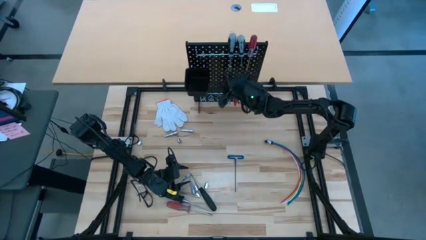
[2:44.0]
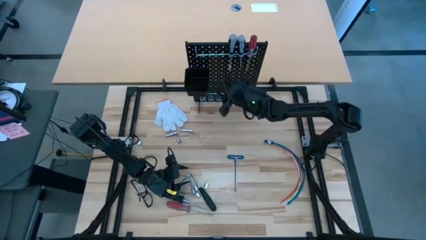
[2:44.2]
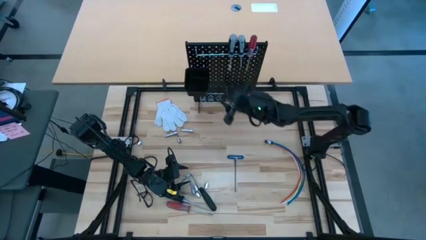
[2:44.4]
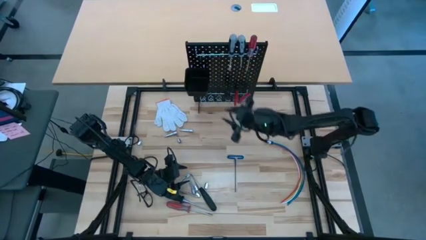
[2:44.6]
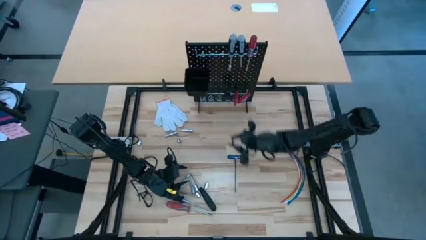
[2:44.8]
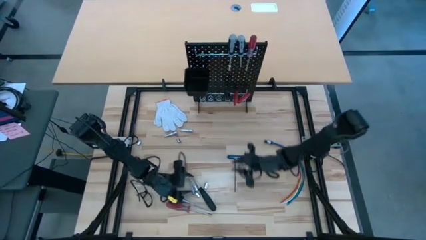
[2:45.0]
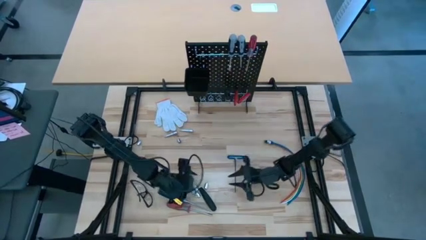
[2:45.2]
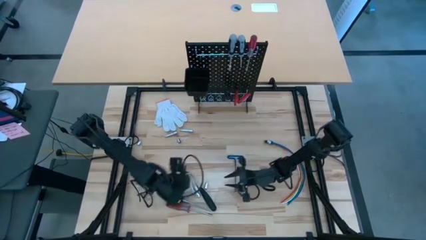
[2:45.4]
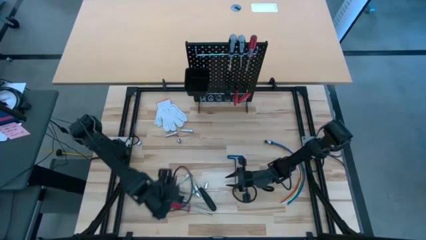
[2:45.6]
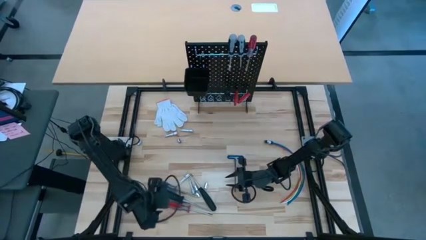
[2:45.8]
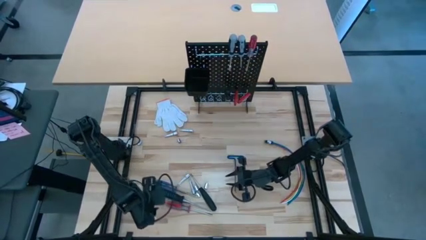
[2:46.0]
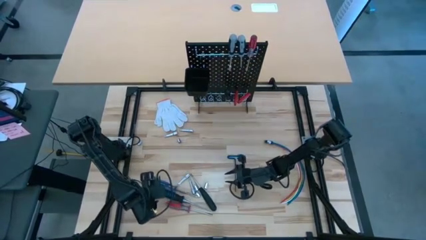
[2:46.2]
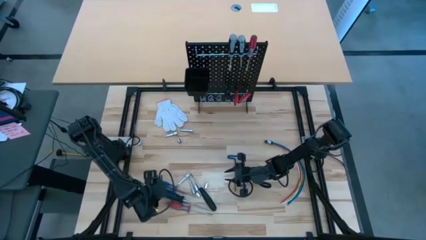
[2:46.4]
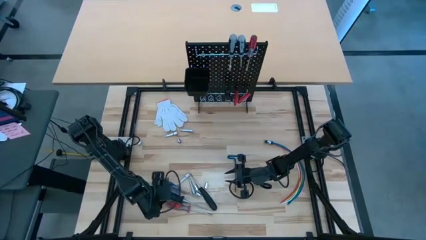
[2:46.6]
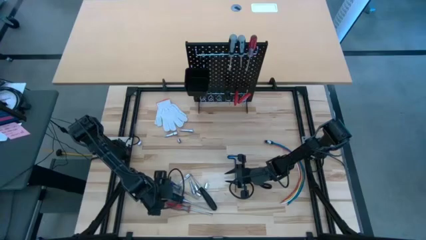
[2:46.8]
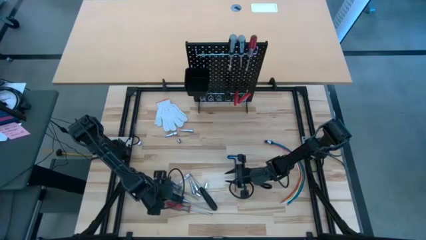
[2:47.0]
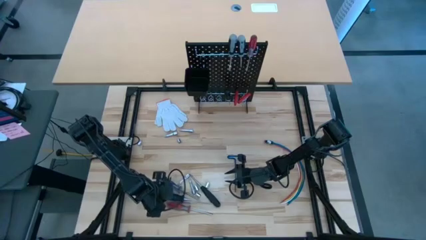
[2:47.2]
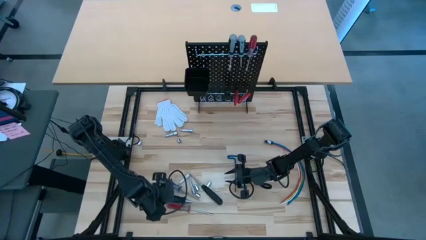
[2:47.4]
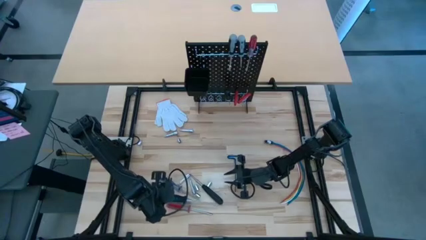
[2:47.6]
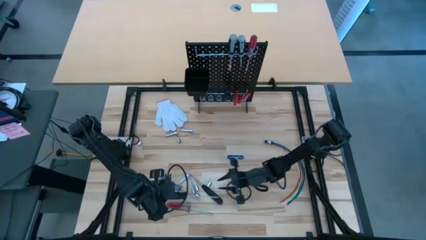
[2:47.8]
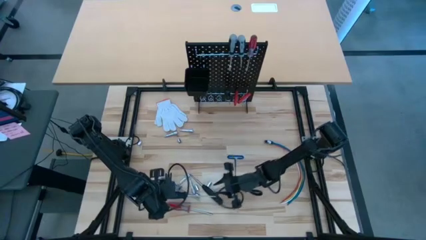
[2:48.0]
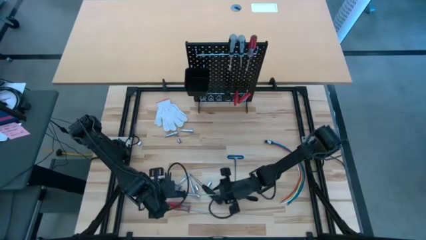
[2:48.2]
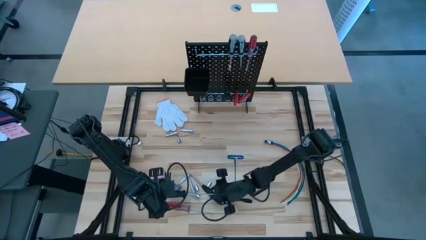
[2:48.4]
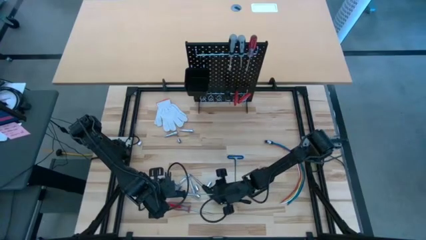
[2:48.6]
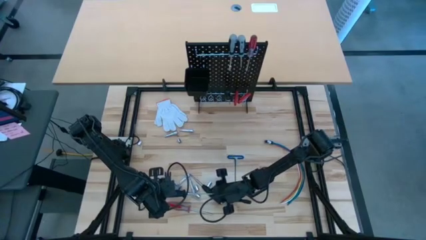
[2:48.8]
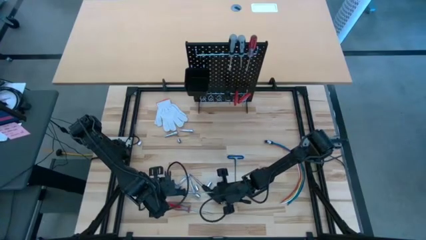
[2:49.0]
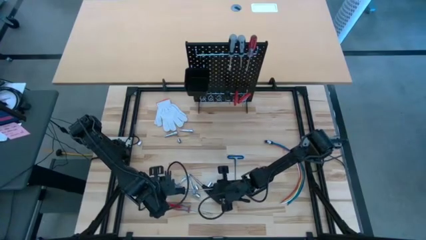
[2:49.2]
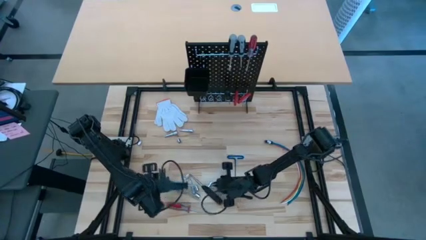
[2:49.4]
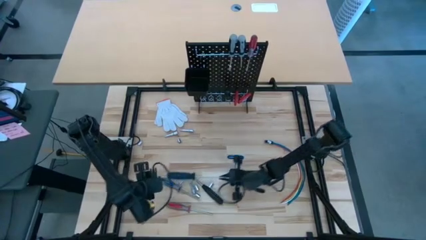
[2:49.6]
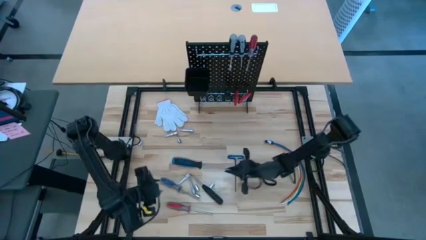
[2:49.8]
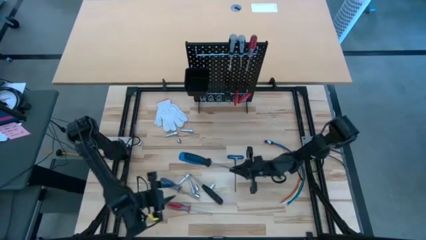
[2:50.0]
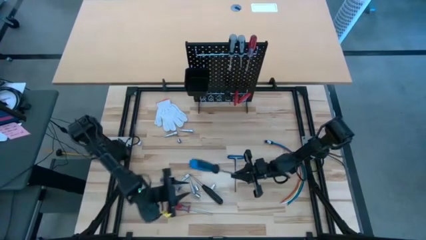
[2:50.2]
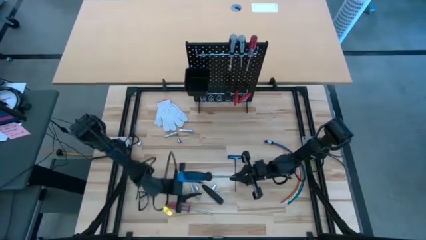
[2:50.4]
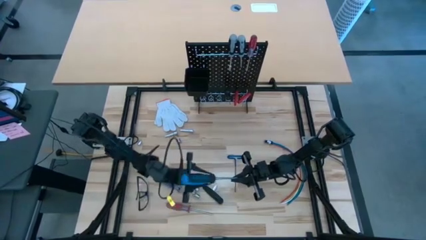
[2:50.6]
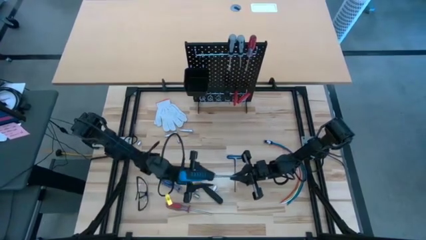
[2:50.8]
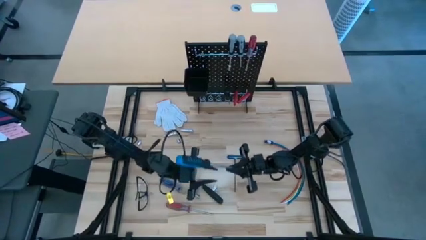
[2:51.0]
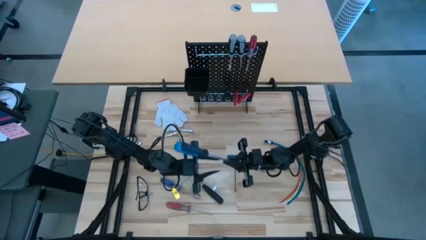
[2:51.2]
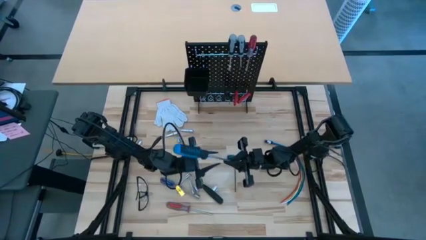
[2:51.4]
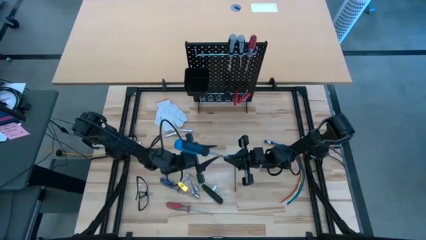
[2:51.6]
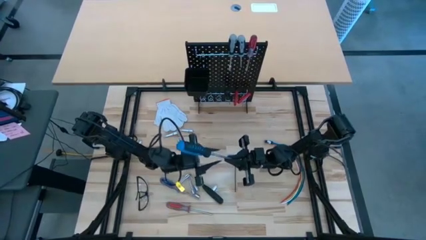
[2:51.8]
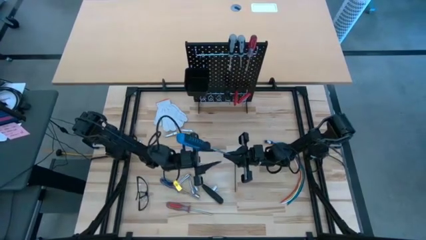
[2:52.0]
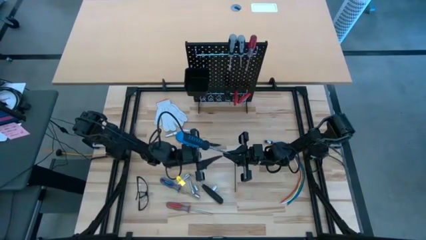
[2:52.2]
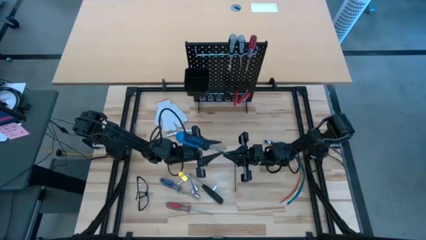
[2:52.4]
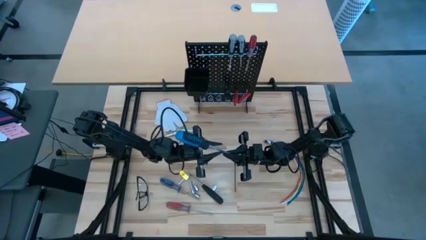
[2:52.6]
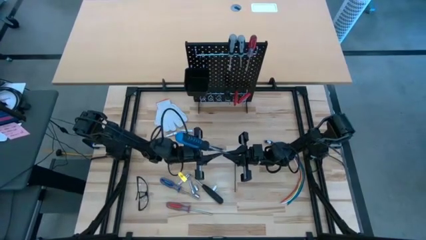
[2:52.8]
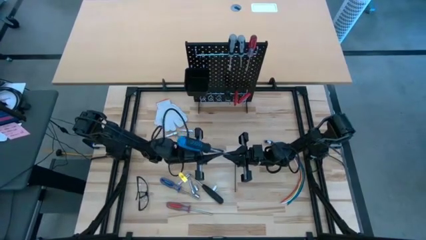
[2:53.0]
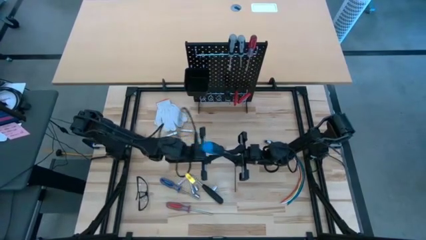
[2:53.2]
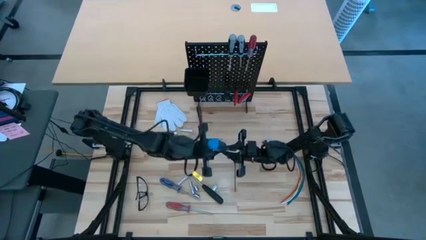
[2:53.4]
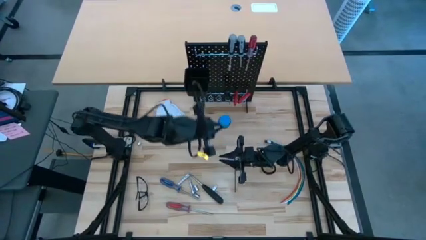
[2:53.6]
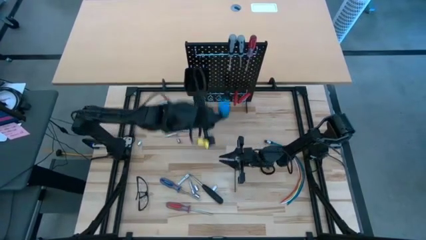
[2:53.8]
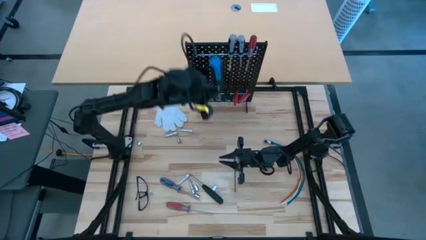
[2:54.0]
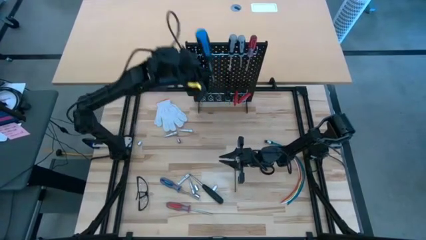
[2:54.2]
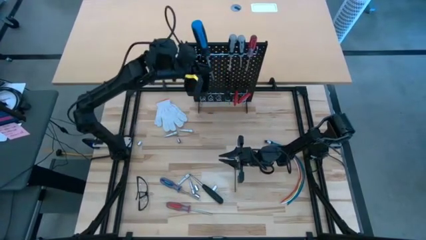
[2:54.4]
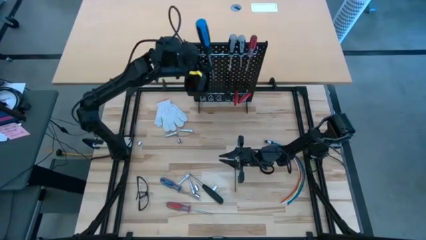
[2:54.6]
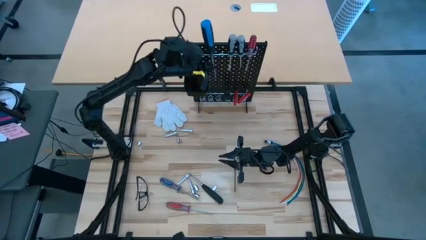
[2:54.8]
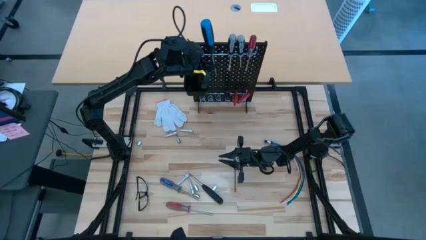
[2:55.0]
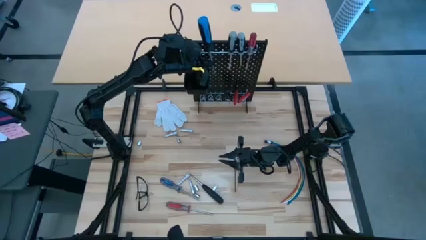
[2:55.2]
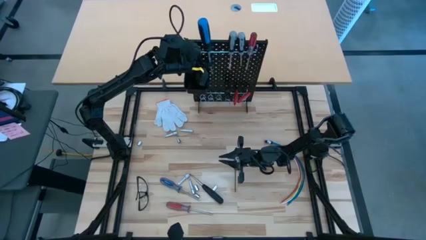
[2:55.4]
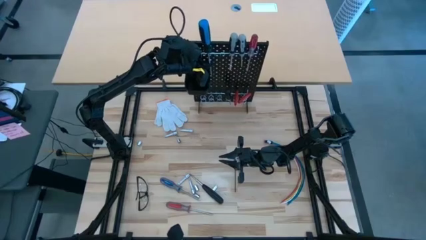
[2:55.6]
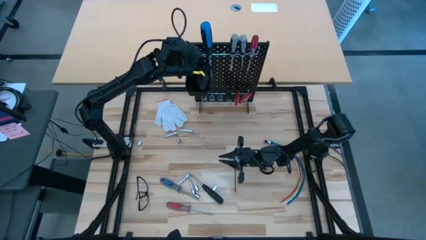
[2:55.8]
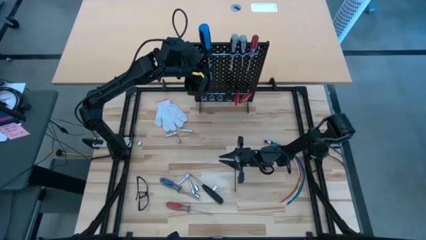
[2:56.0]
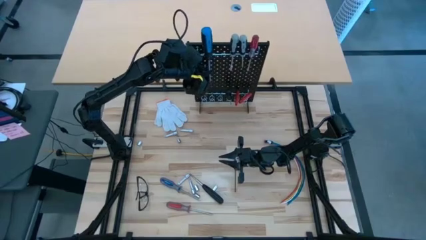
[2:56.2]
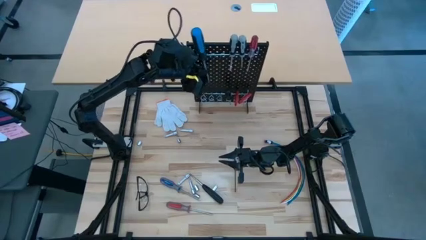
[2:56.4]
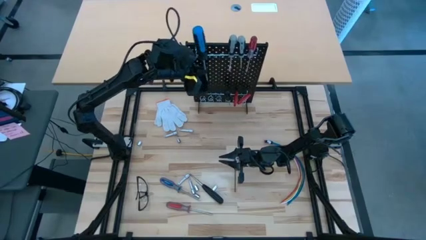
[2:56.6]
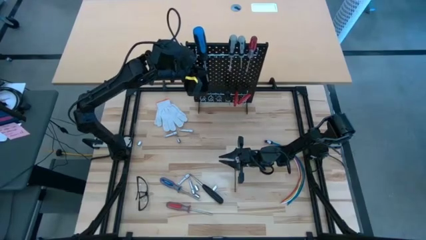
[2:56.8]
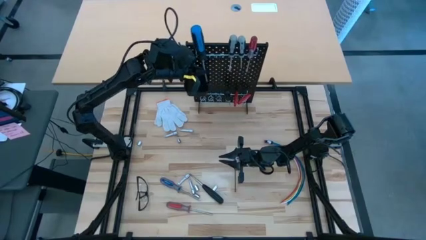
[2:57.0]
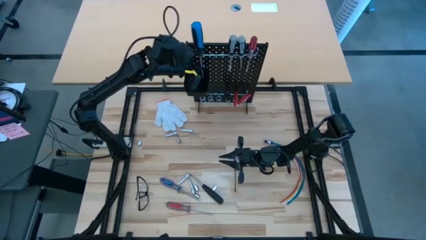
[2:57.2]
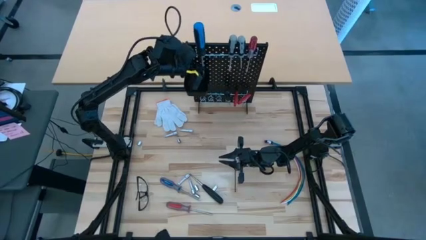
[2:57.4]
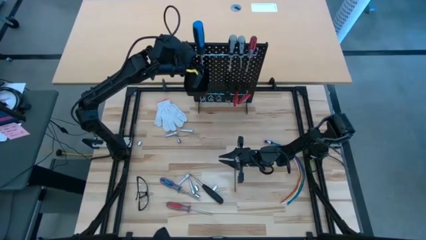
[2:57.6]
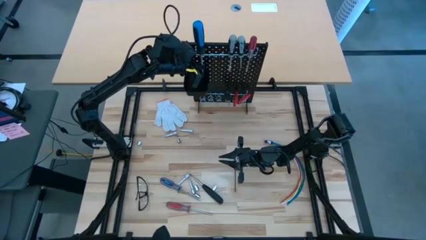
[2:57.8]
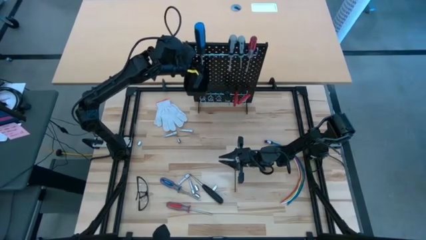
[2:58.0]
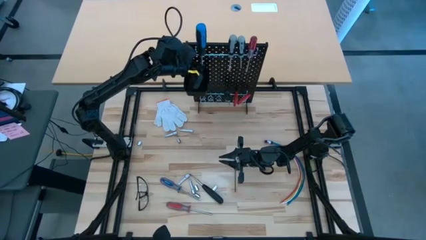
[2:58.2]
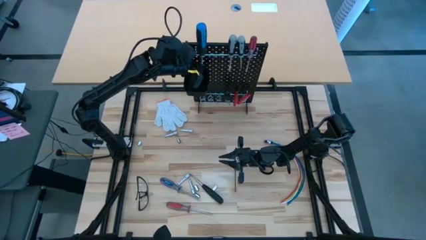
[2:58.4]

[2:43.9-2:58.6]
Task: Hang tools onto peg board
Hang the blue screwdriver on the pegboard bin

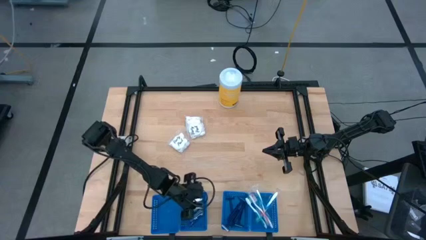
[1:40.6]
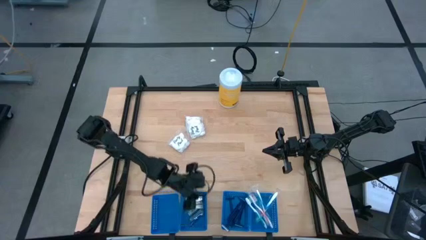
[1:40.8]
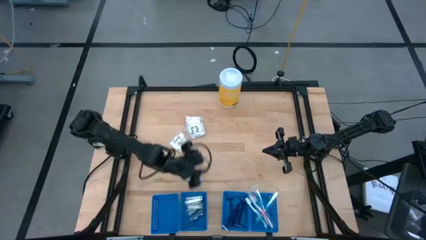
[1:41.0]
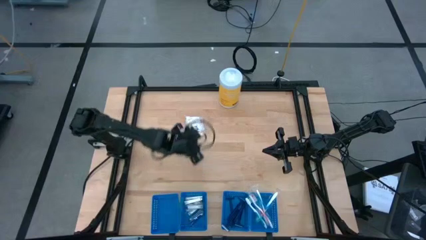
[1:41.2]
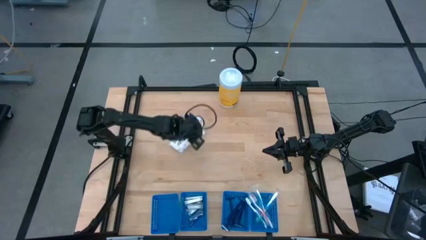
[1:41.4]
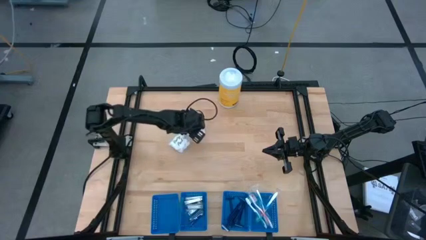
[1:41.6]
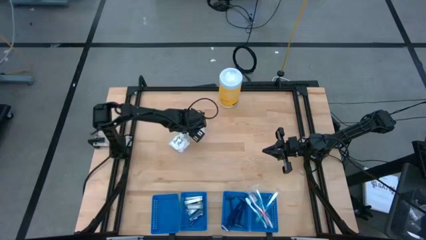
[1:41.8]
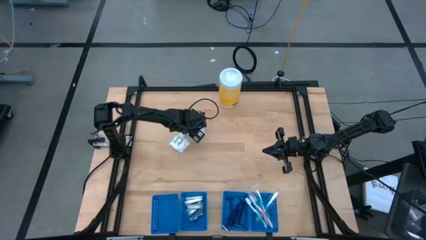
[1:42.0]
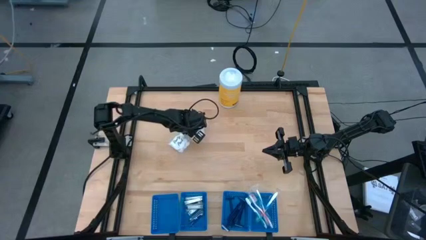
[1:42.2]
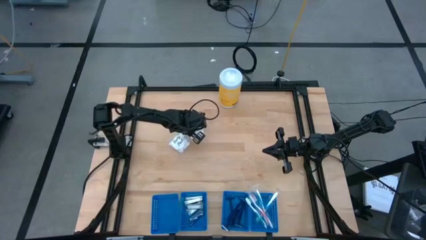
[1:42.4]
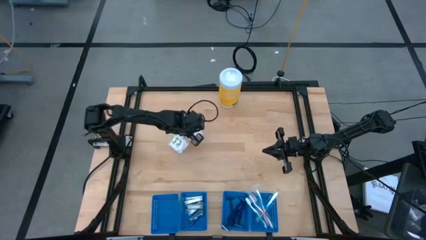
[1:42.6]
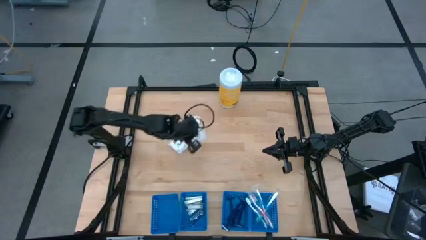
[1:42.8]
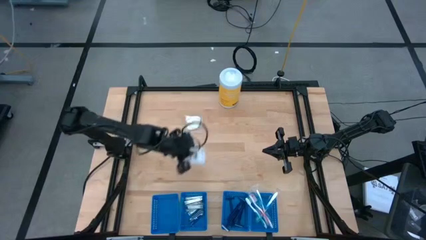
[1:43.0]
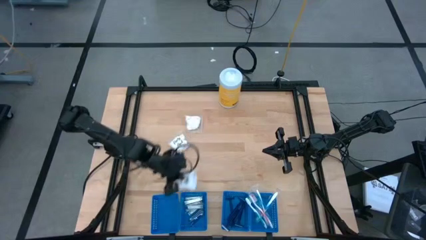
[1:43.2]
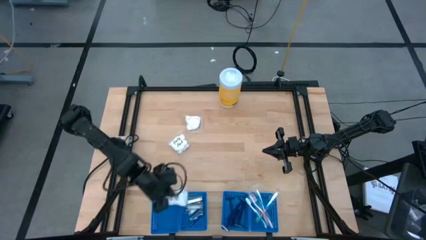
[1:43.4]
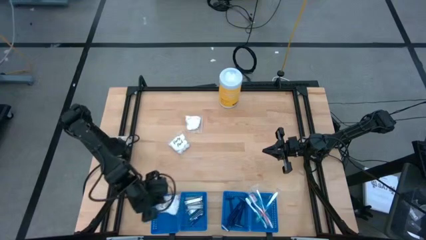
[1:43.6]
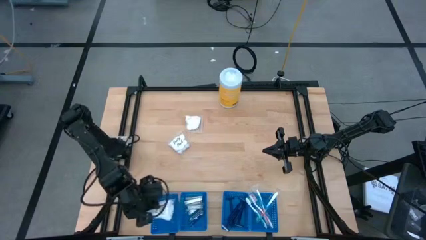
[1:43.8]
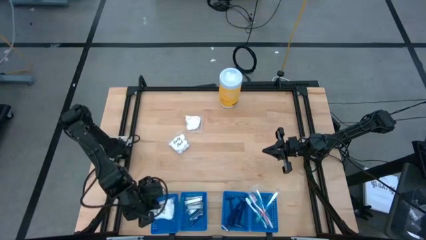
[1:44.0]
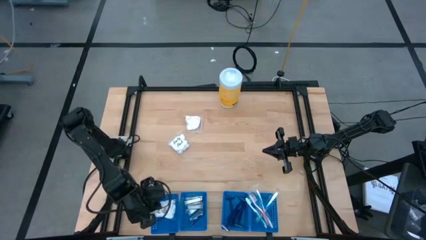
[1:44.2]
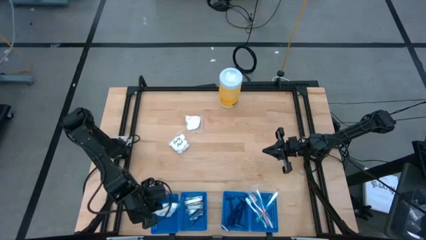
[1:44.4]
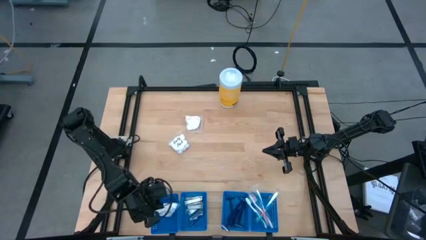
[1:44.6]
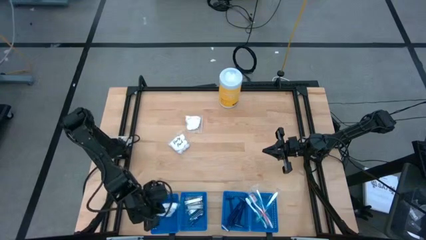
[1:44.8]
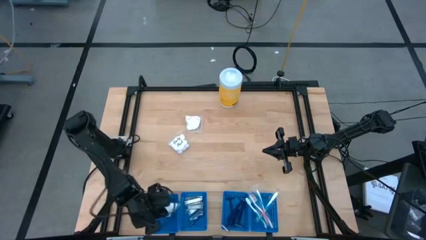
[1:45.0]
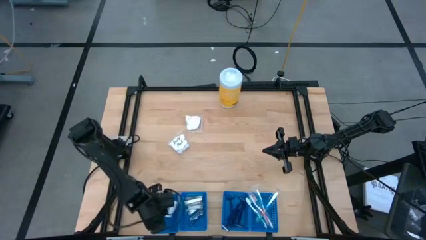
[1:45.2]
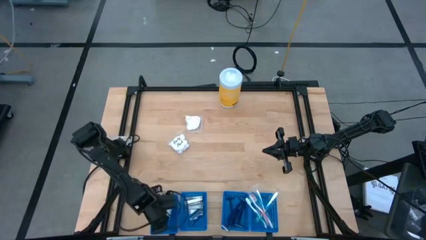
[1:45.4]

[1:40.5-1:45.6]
Task: Pick & Place Travel size toiletries
Put the white cotton pack into the blue basket
